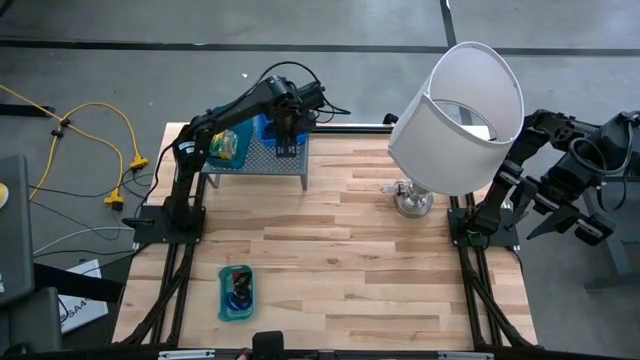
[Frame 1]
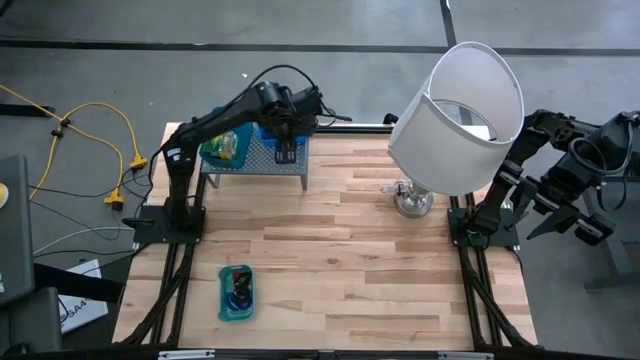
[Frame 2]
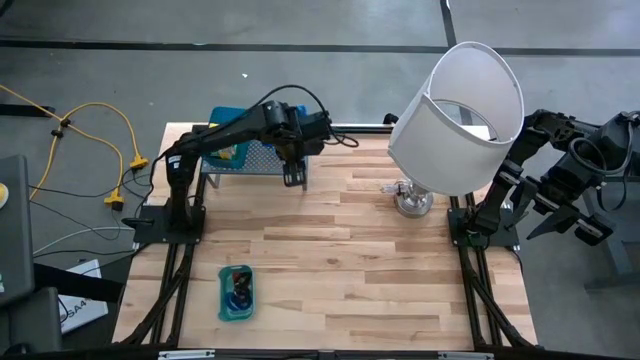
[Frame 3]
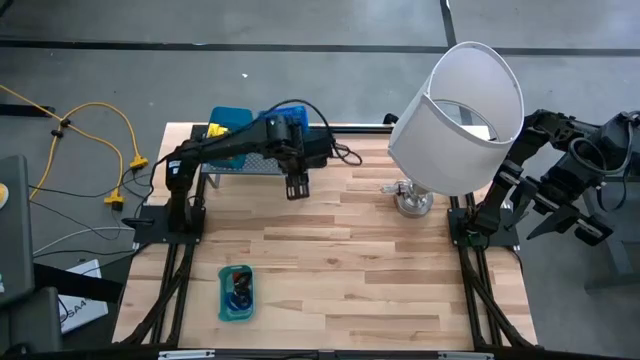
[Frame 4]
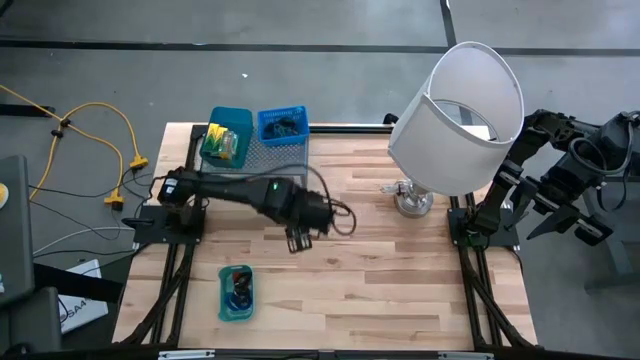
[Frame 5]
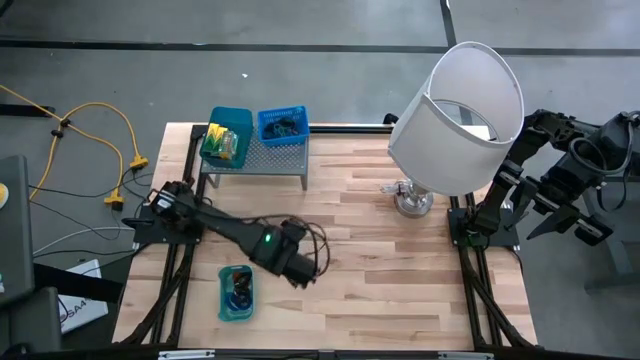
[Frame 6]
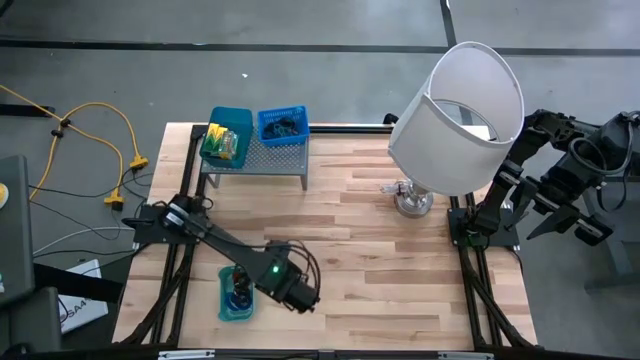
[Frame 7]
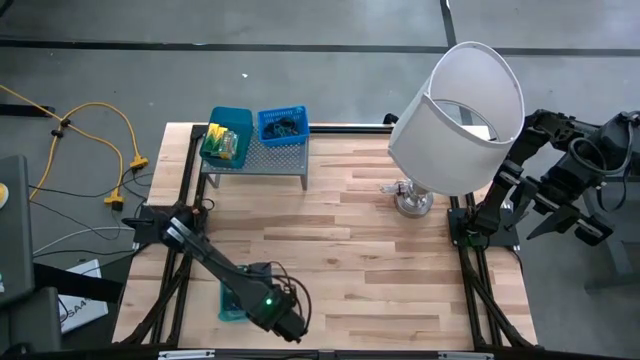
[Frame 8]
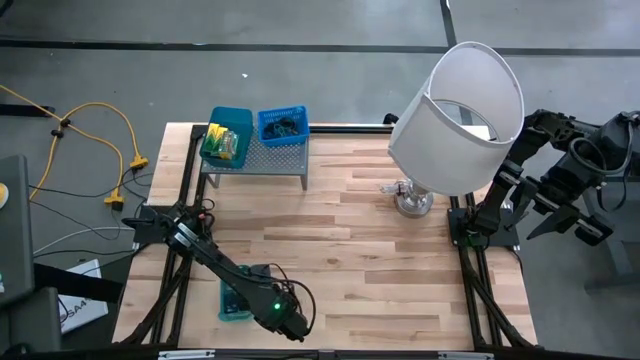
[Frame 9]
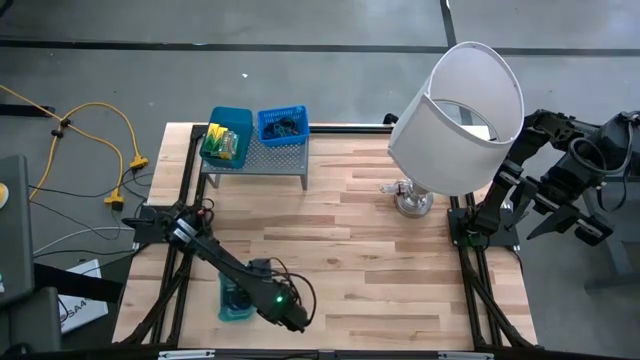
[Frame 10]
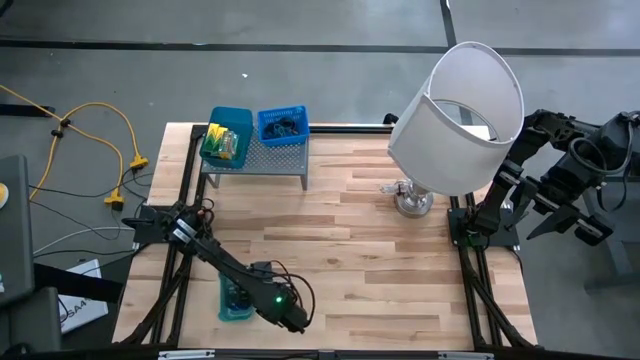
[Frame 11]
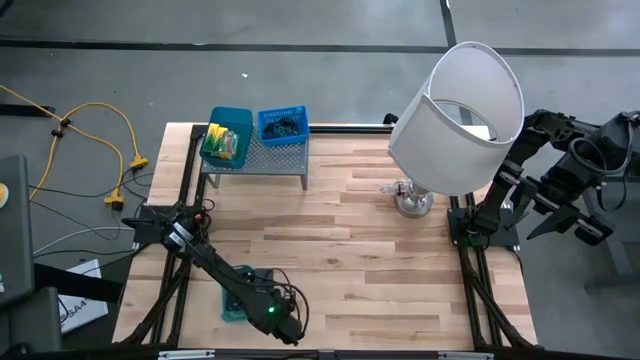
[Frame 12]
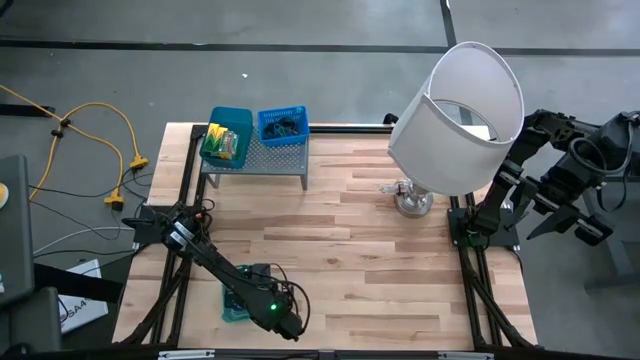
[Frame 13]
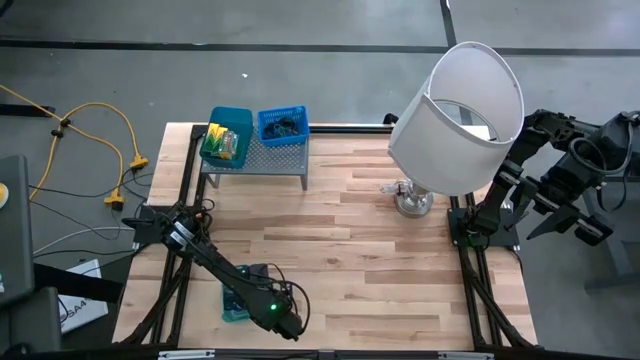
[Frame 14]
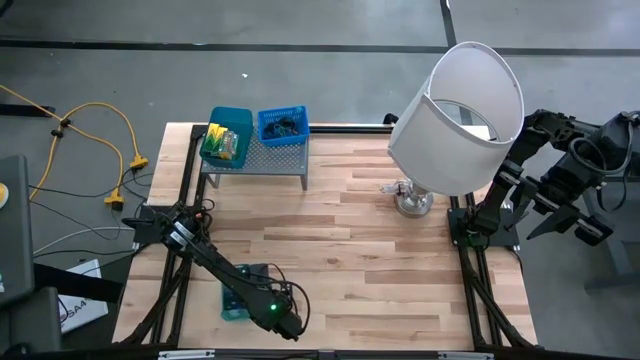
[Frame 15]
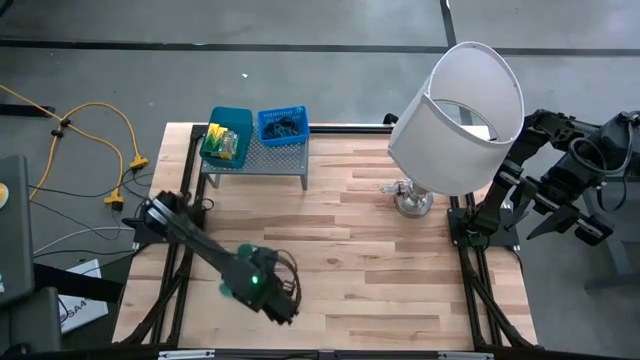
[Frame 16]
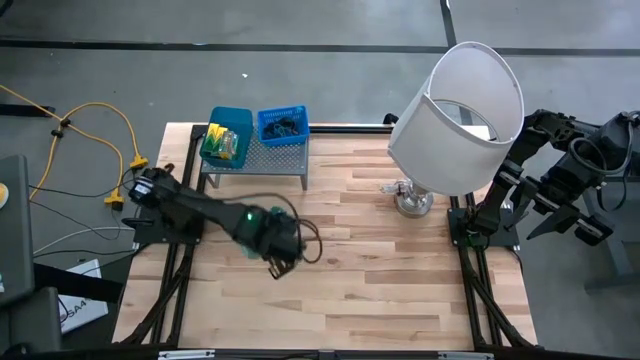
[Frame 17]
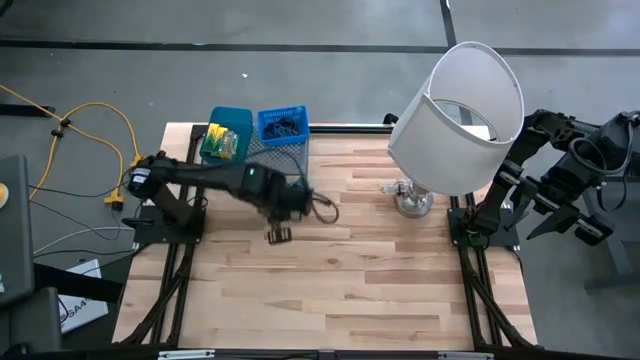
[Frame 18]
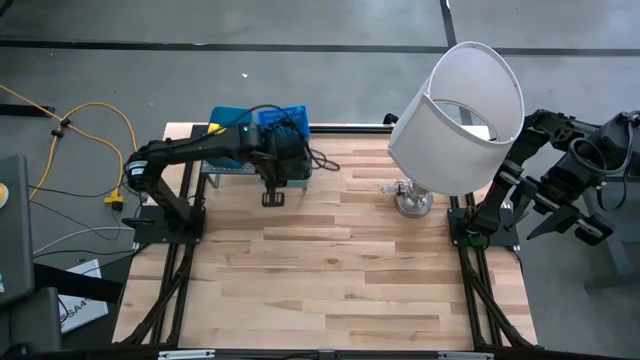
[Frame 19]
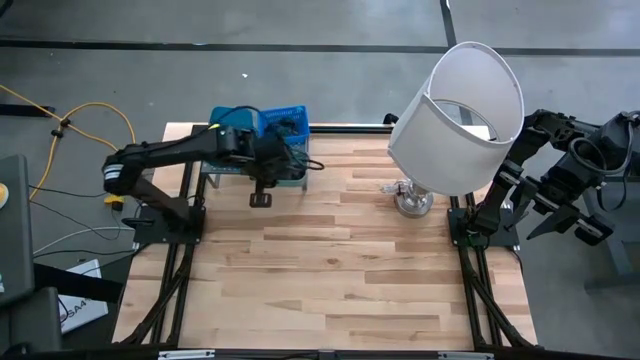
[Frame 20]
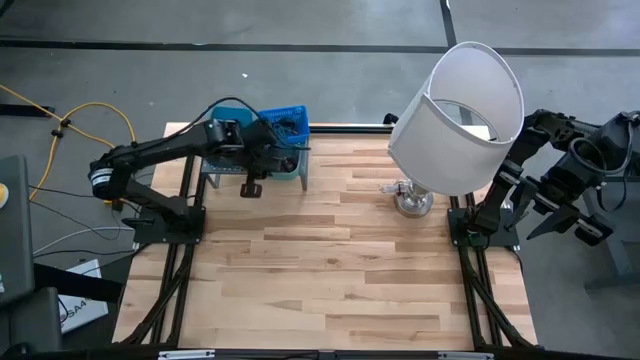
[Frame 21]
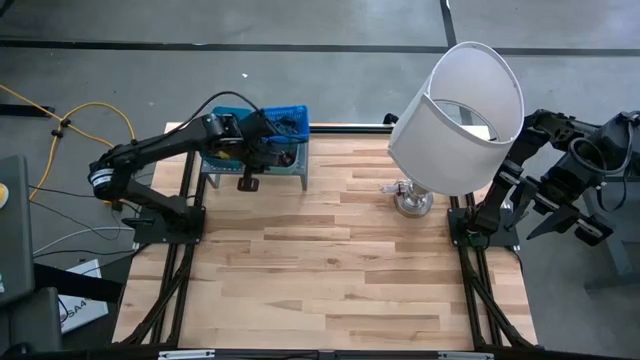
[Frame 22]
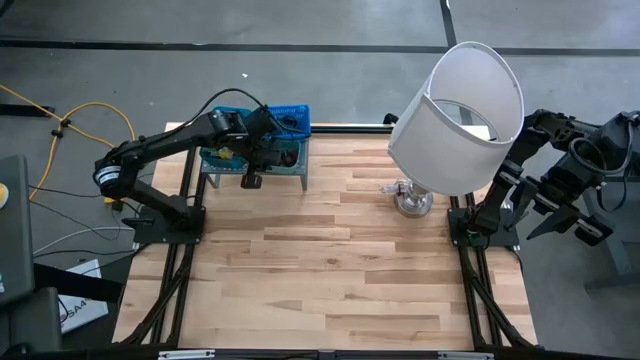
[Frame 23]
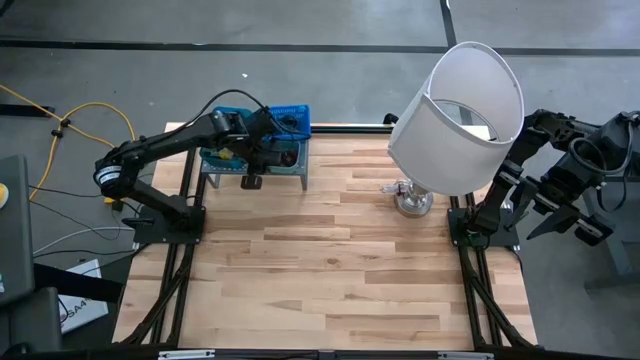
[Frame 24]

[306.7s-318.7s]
Task: Pick & Place Office Desk Supplies
Put the green bin on the shelf

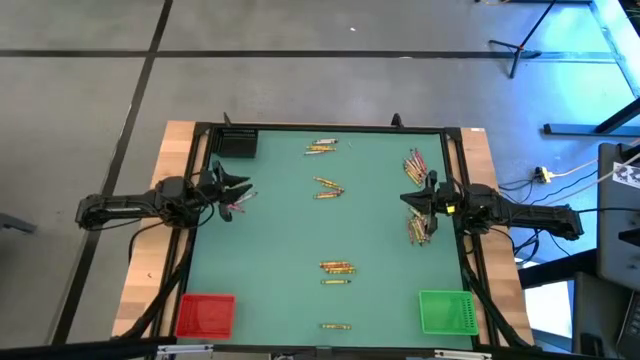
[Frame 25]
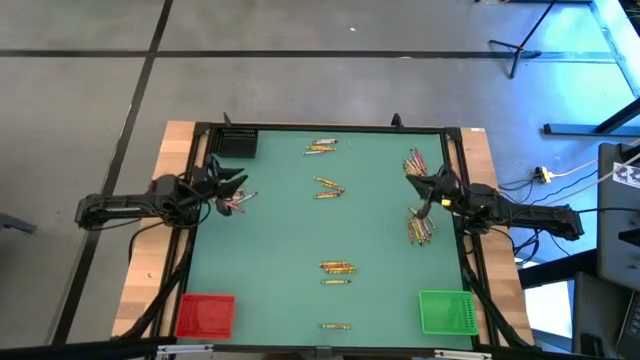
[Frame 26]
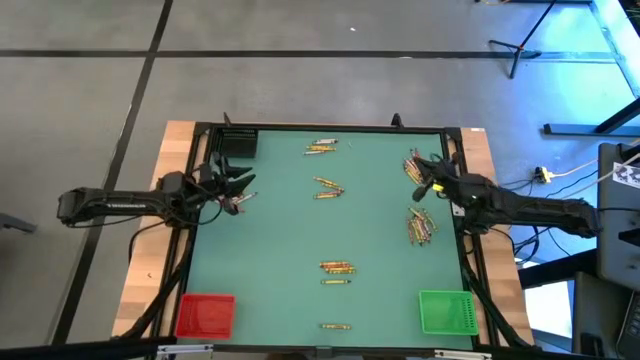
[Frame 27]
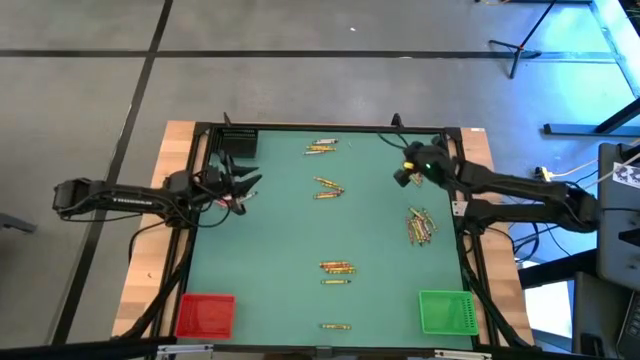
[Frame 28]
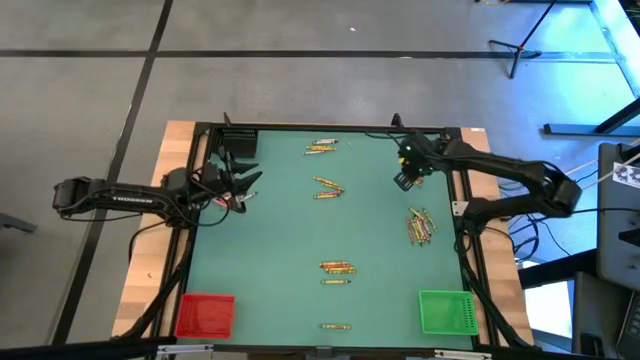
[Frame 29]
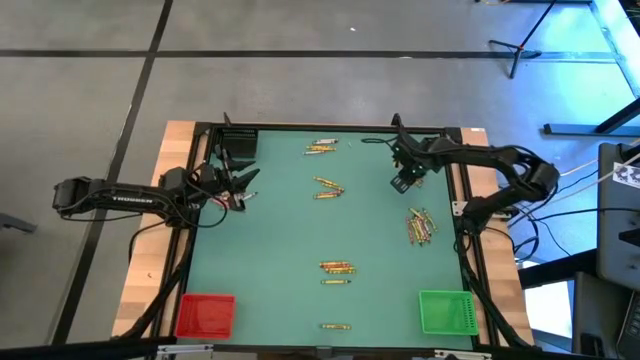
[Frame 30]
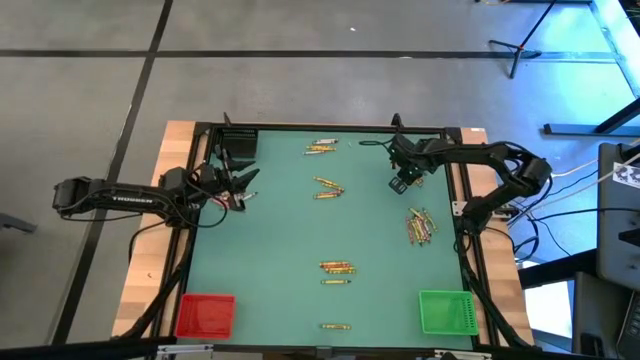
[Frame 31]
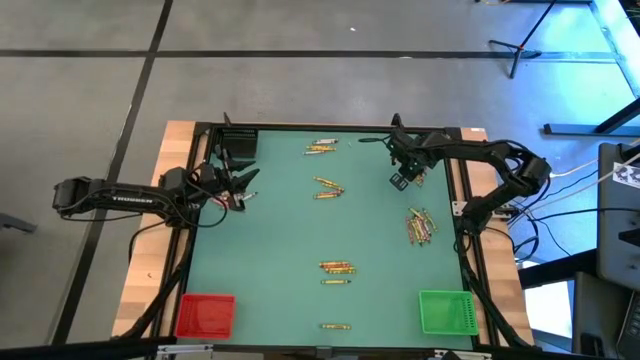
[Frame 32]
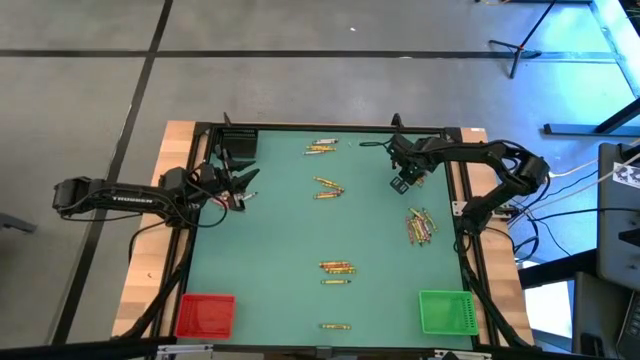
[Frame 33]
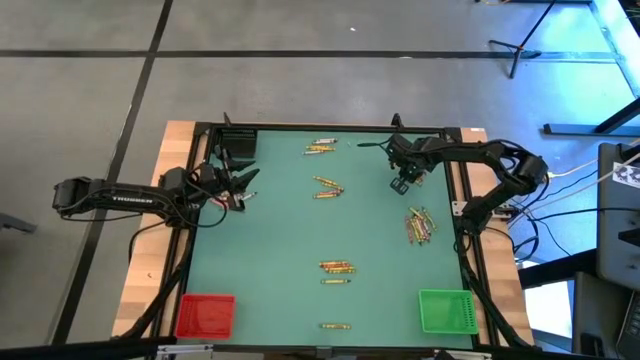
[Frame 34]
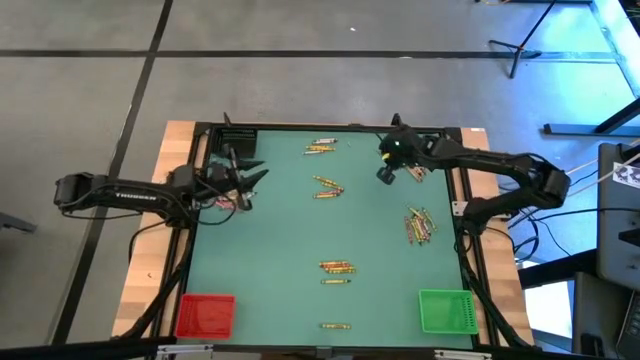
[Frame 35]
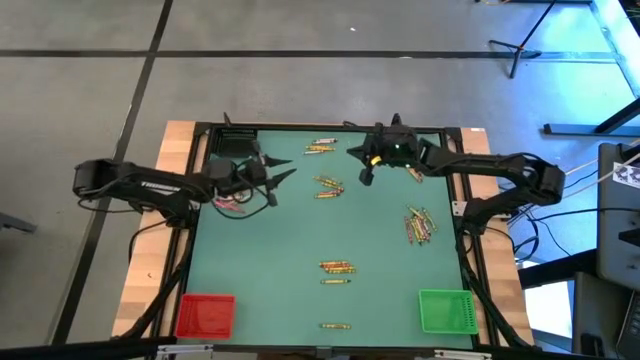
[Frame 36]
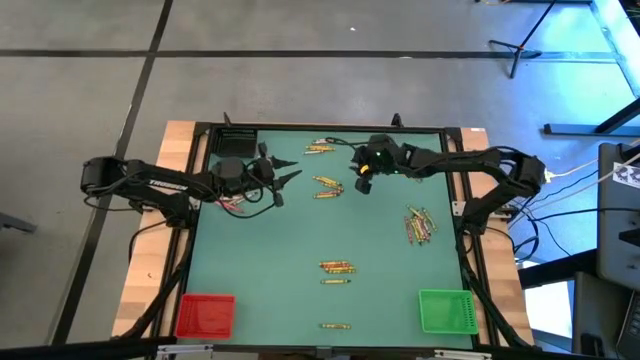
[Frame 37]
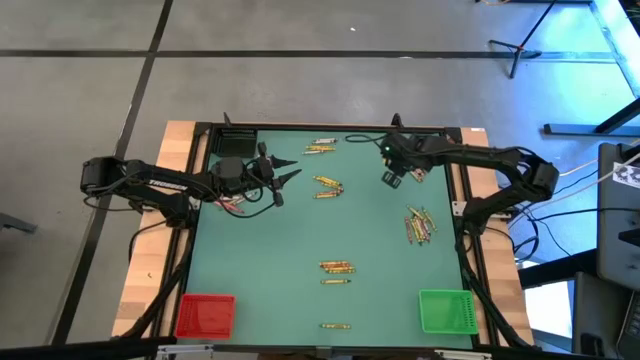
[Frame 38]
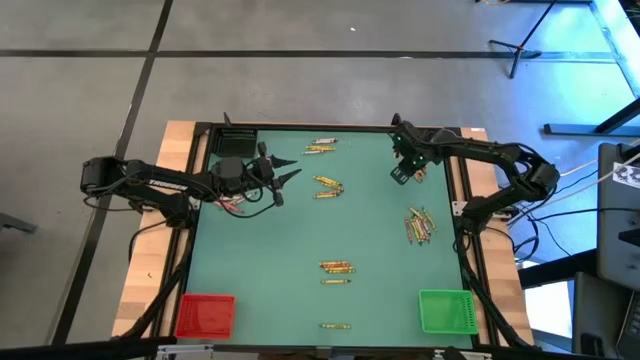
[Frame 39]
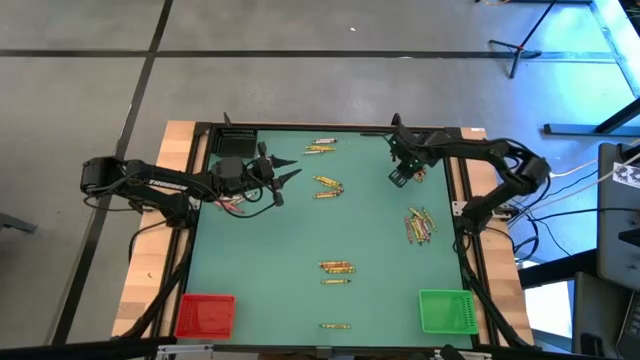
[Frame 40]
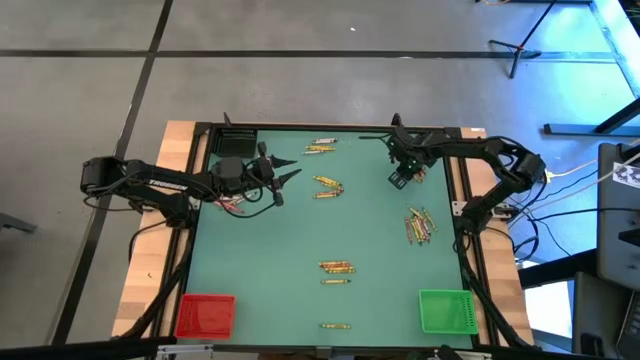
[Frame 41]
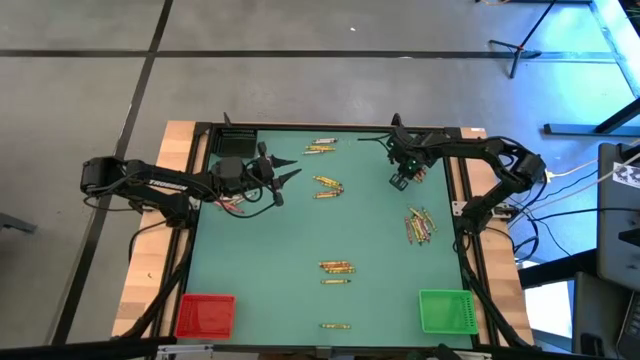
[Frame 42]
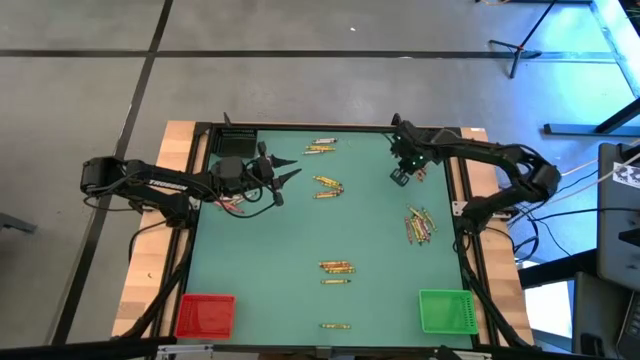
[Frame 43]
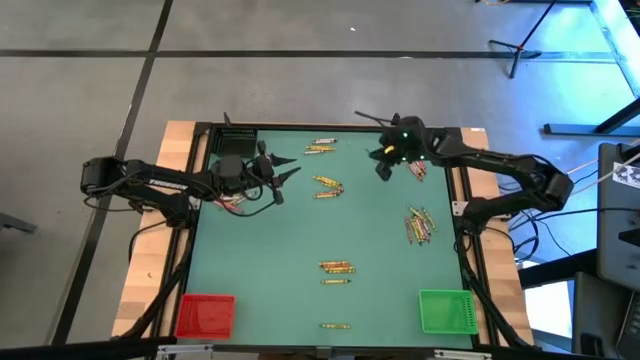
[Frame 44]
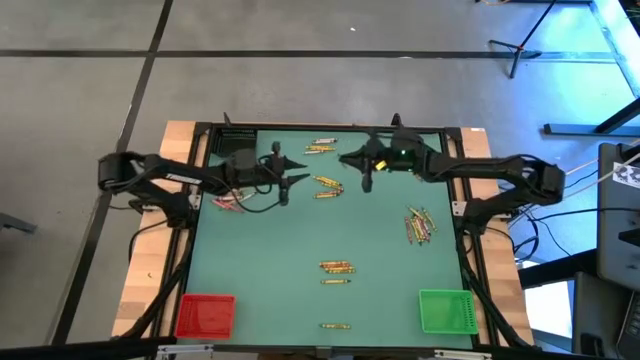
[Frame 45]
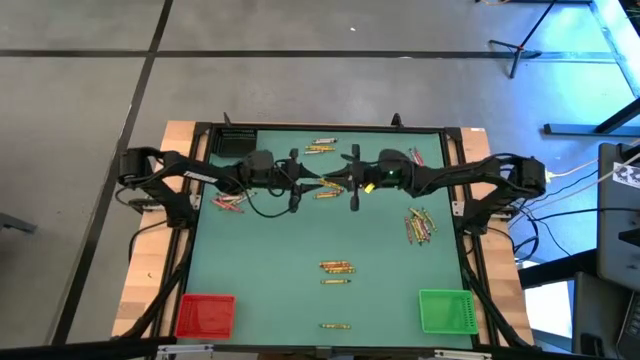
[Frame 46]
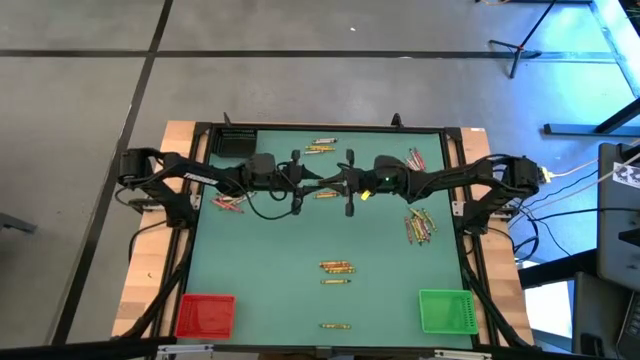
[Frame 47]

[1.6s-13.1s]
Task: Sort crayons
Put the green crayon into the black bin
